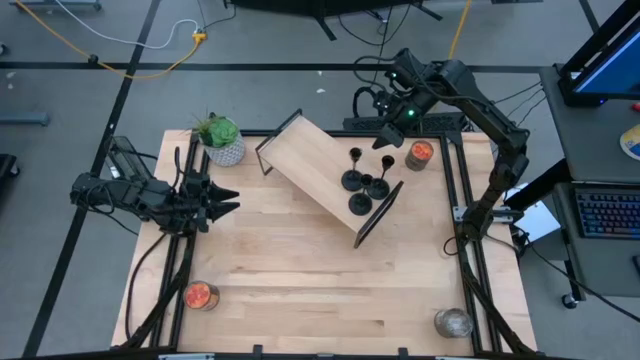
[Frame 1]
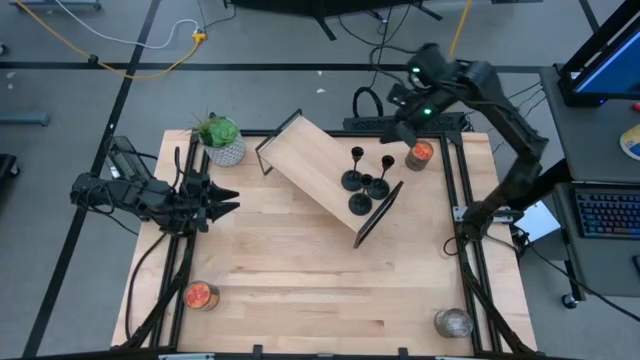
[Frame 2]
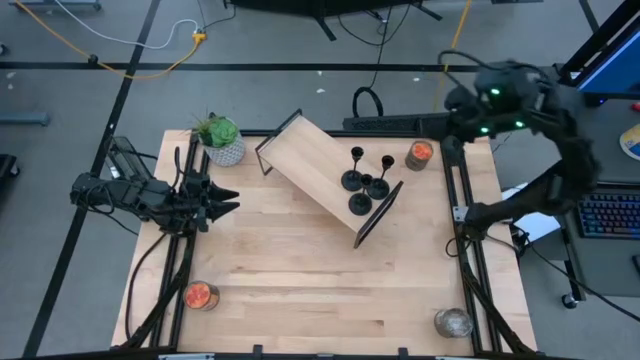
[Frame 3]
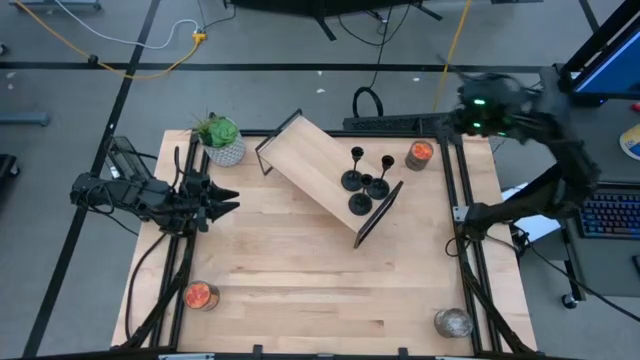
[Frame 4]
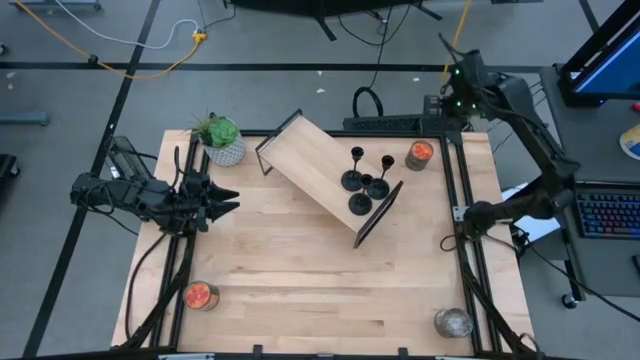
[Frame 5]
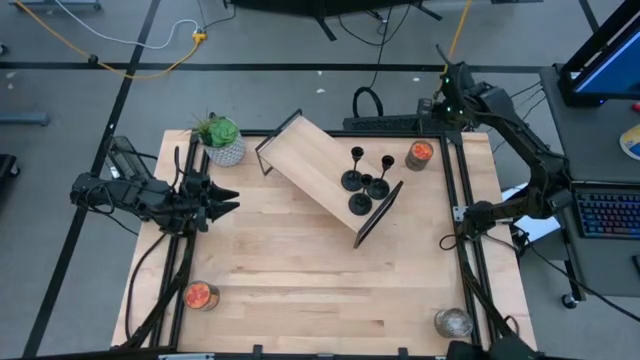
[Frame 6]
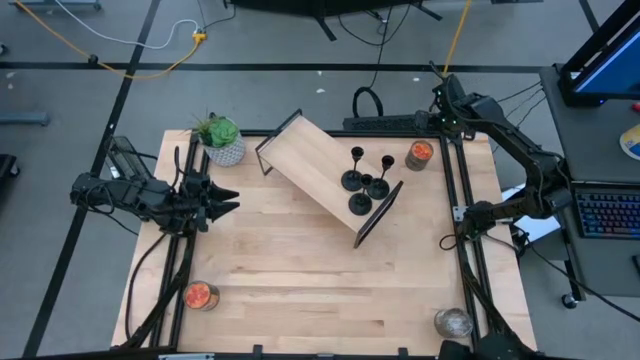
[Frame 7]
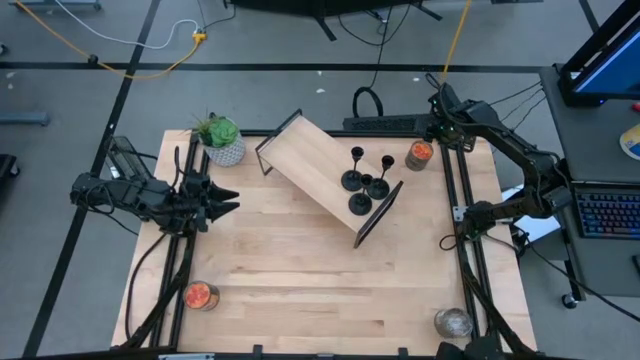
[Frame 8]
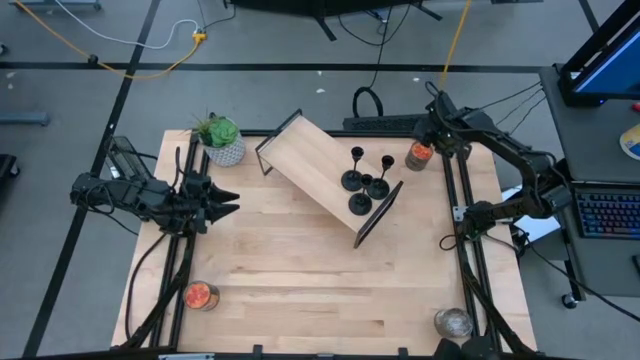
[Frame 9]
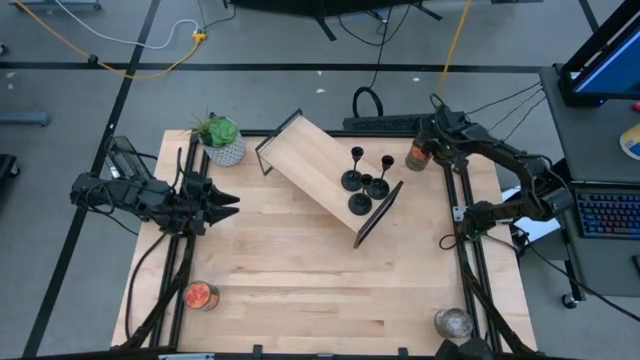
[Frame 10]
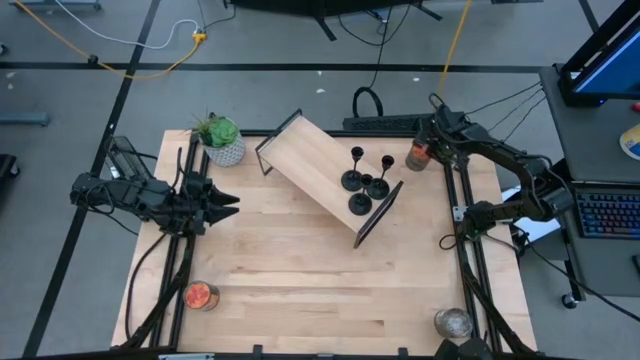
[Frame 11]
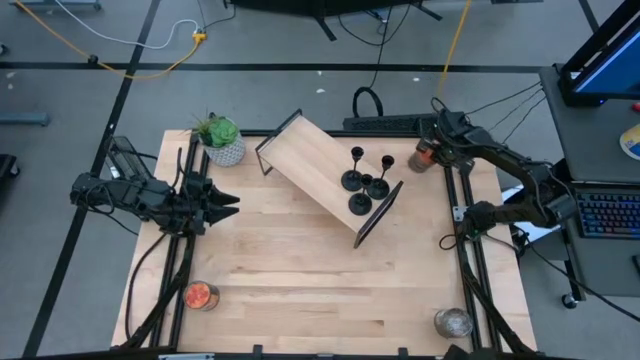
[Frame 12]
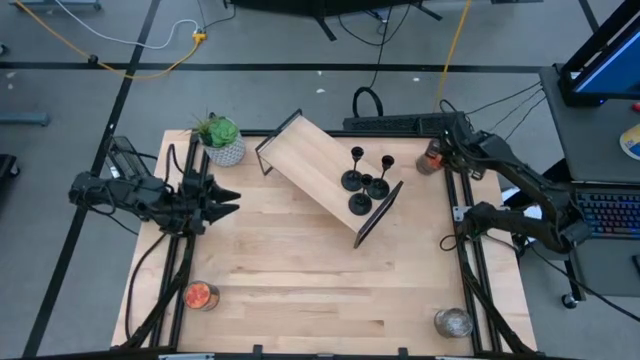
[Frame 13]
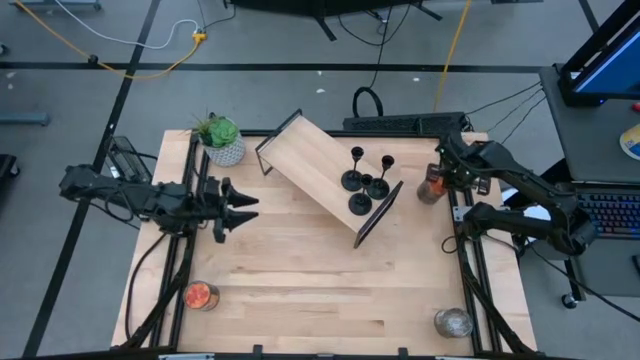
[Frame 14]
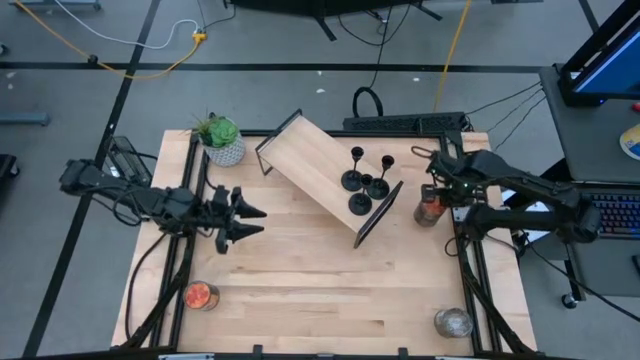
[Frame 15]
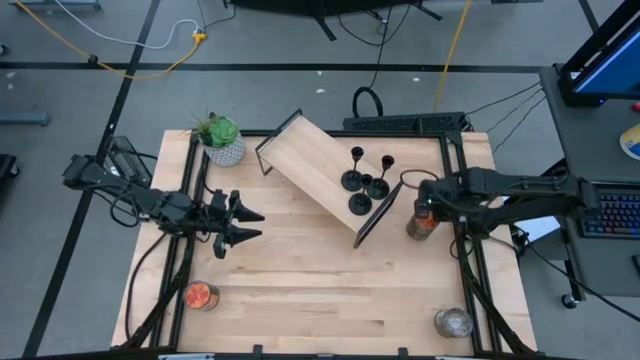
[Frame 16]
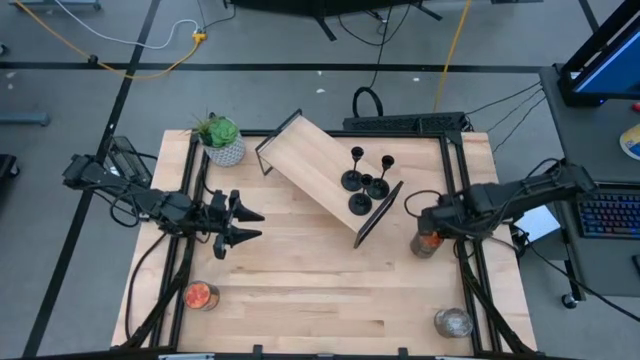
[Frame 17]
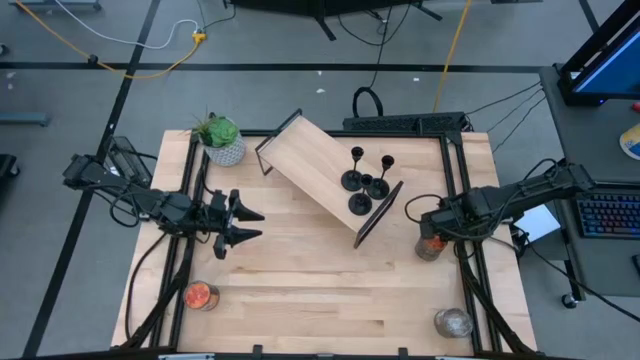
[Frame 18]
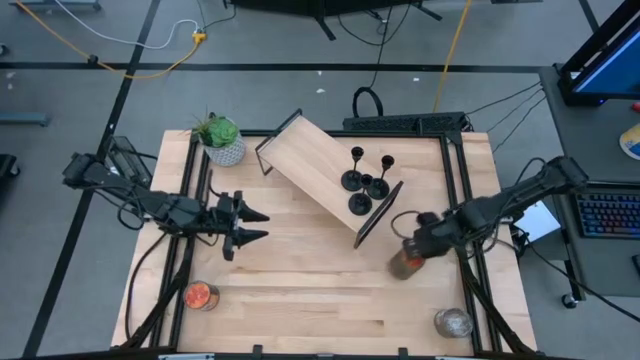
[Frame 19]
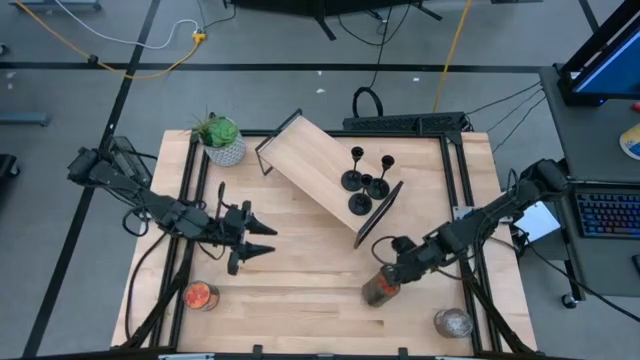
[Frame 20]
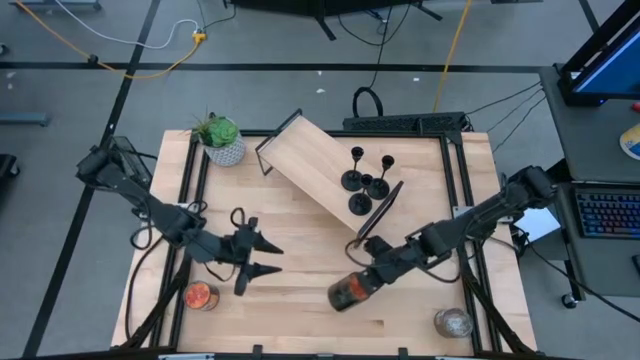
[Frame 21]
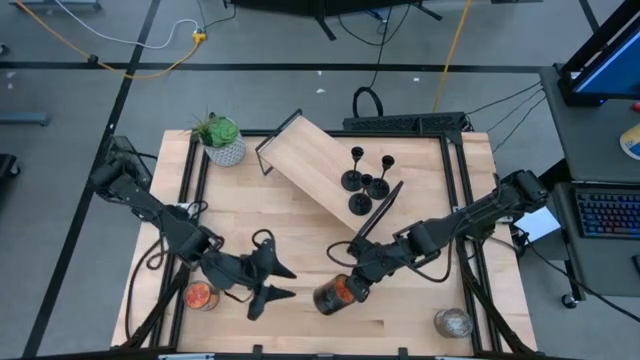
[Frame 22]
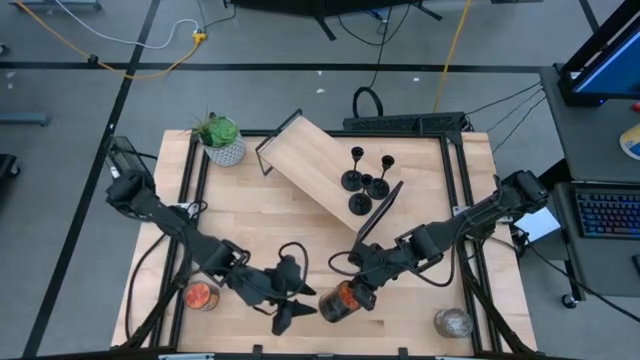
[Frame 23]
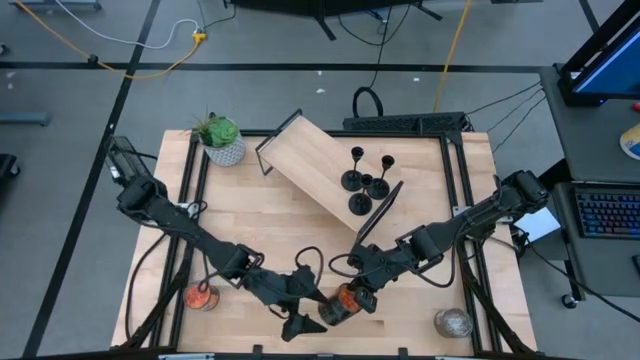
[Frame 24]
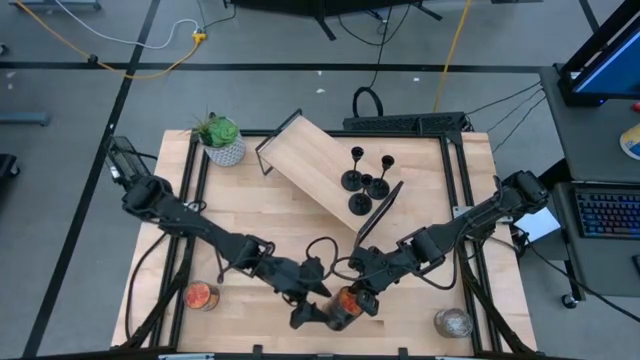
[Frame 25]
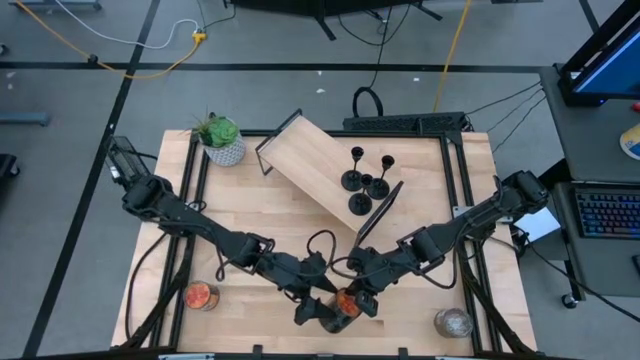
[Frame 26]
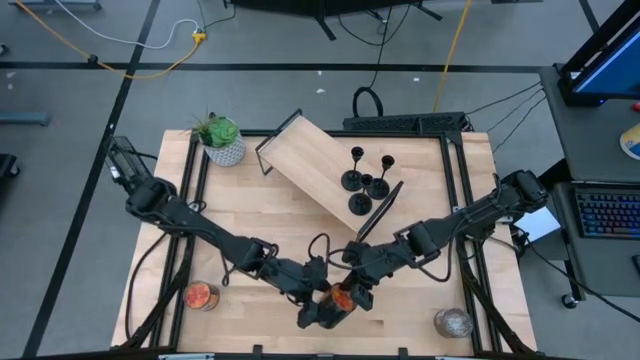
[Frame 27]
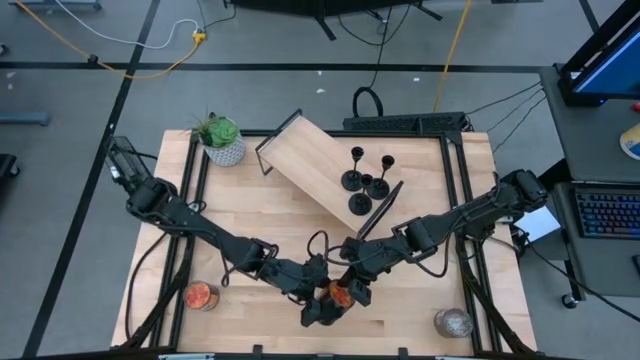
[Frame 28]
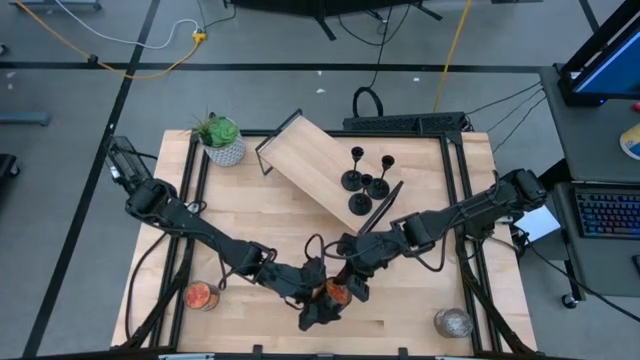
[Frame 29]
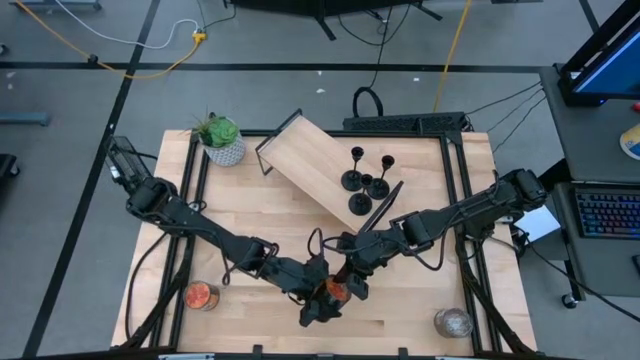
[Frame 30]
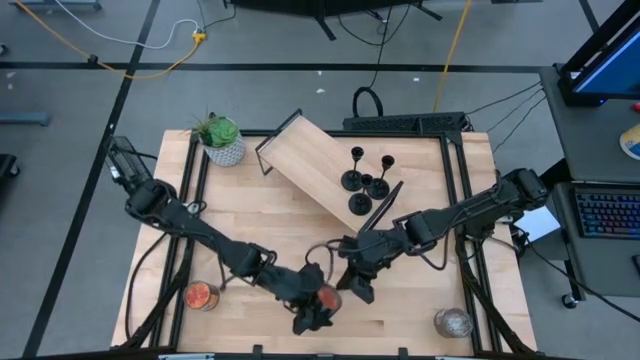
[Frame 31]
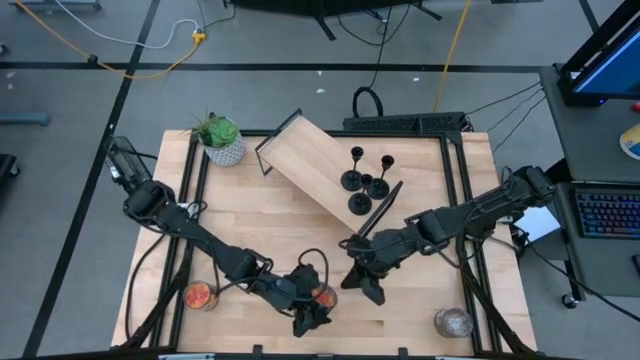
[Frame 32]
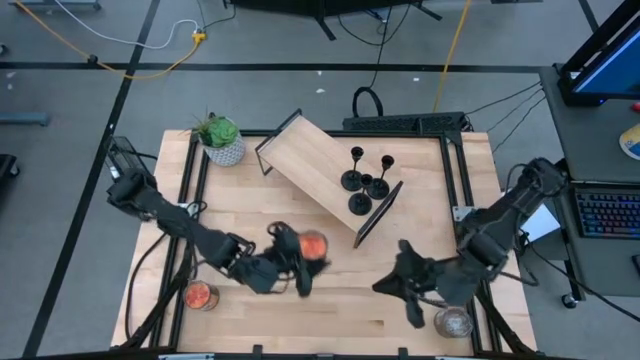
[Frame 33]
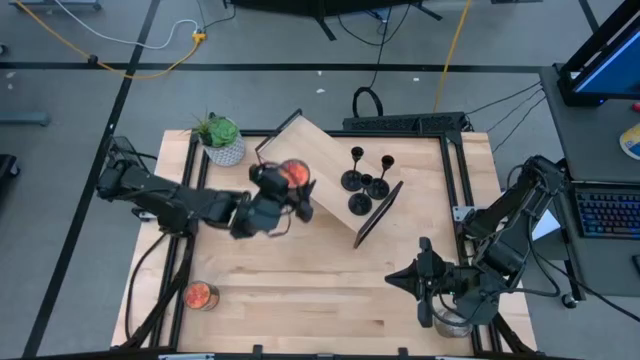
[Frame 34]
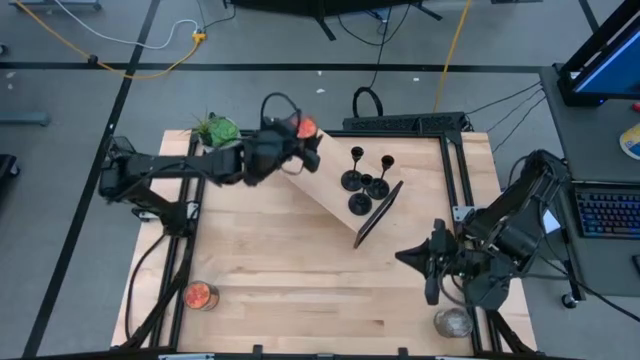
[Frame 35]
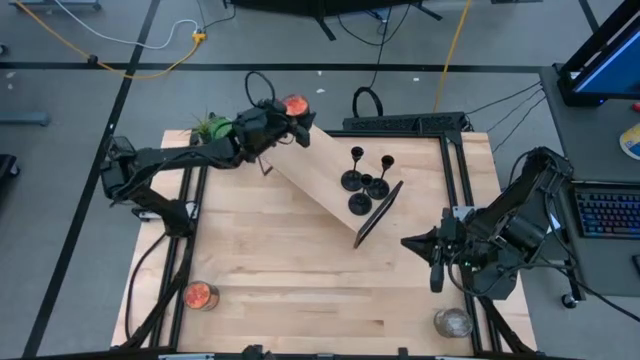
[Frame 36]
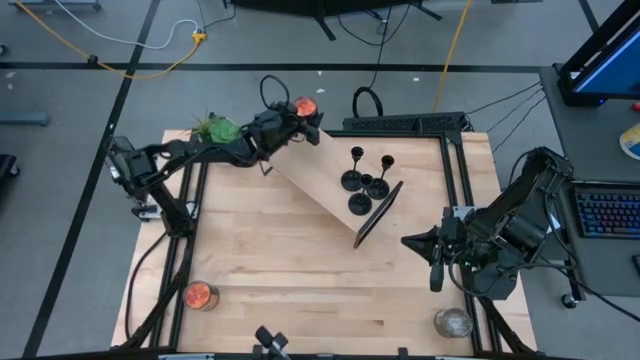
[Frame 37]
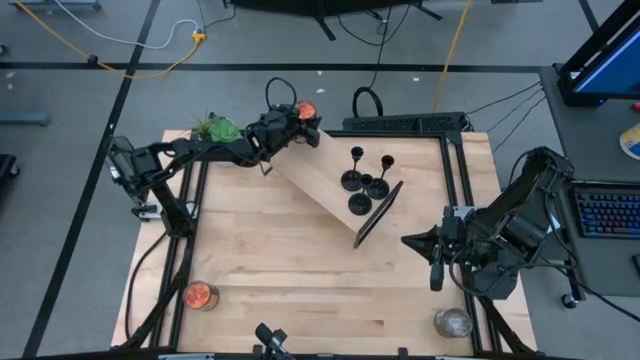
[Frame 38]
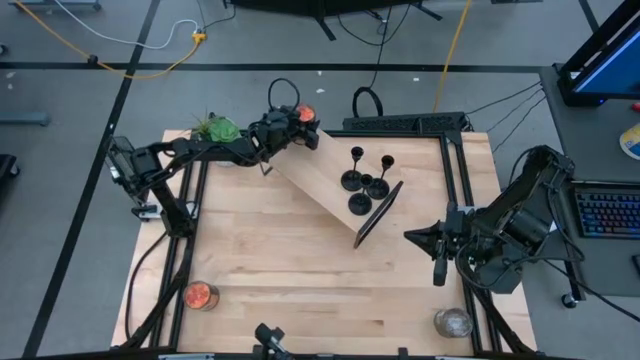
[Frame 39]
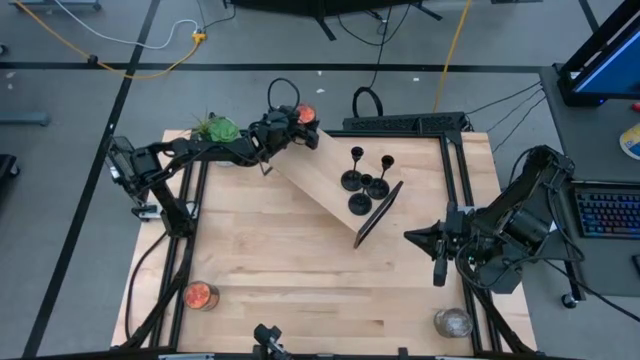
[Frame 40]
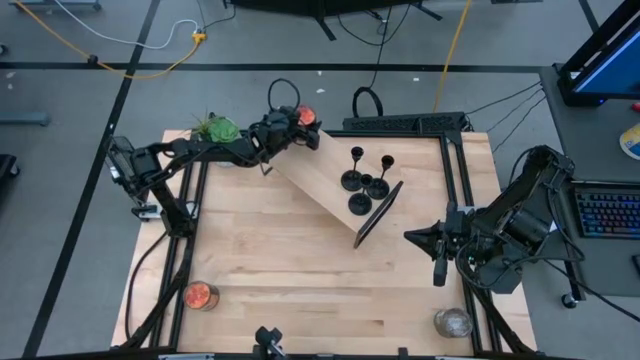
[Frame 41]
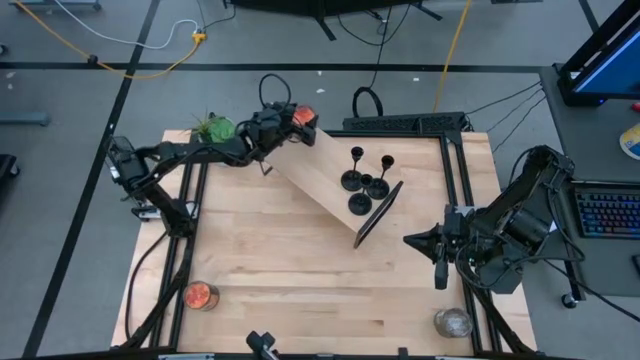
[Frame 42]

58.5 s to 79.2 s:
Task: Pick & Place candle stick holders
Put the top orange scented candle on the shelf
